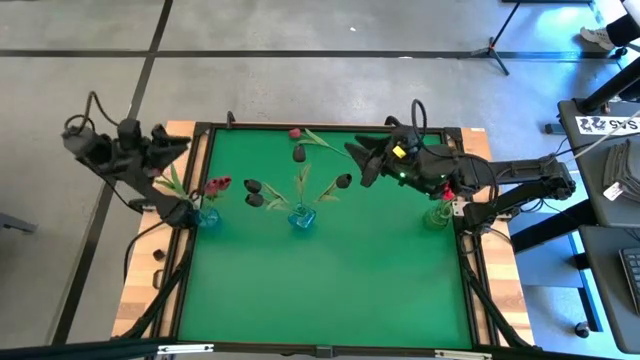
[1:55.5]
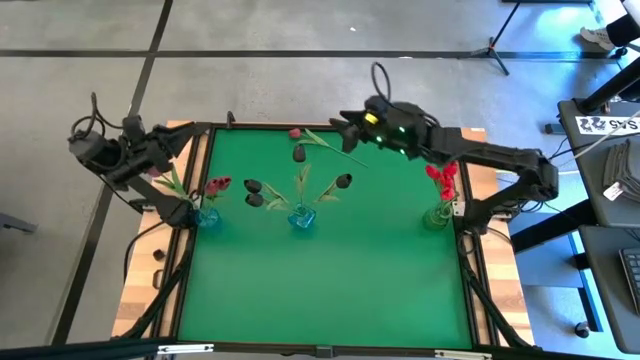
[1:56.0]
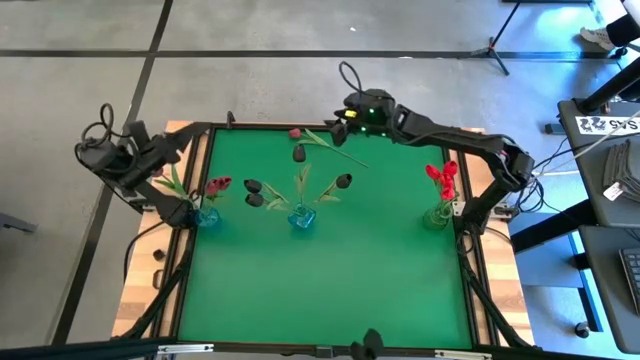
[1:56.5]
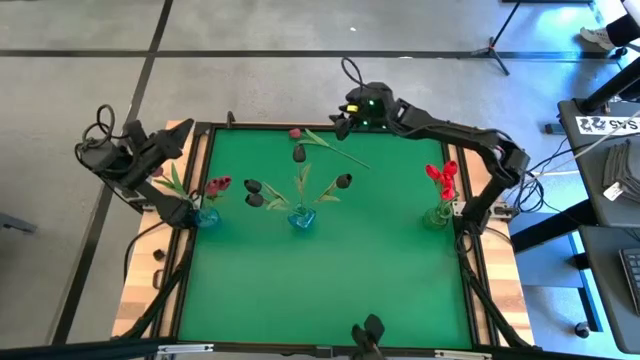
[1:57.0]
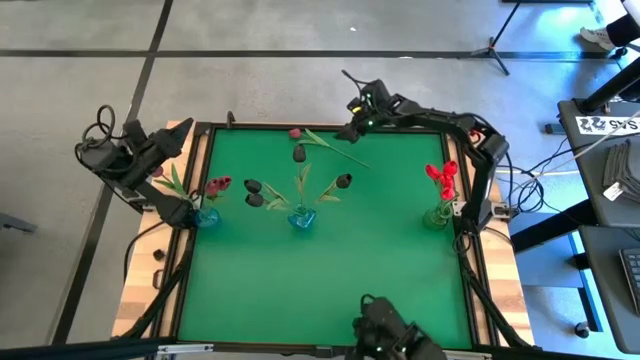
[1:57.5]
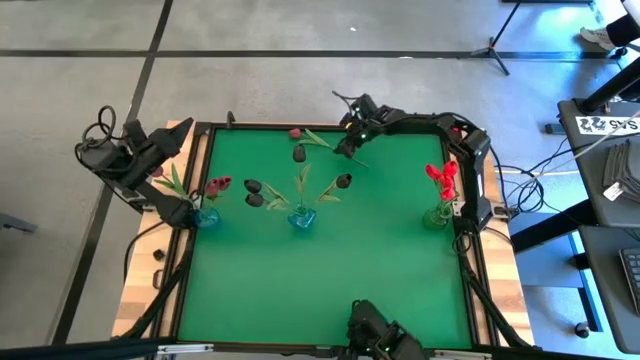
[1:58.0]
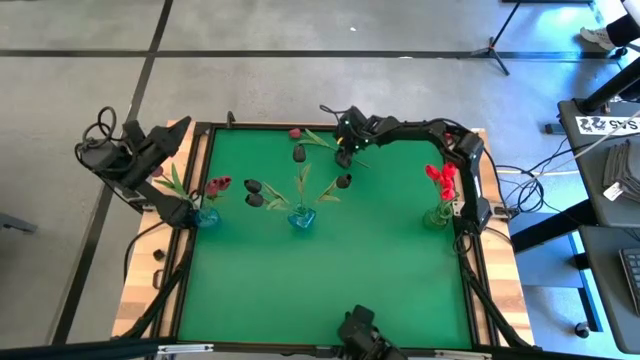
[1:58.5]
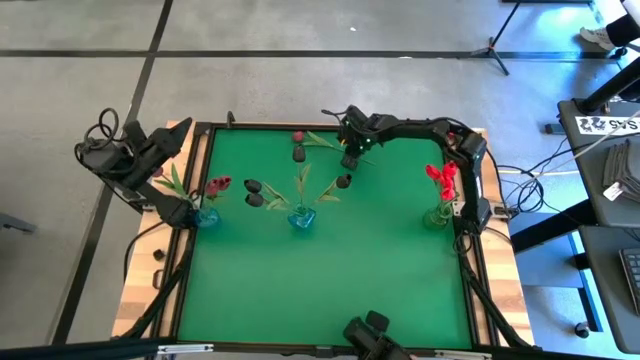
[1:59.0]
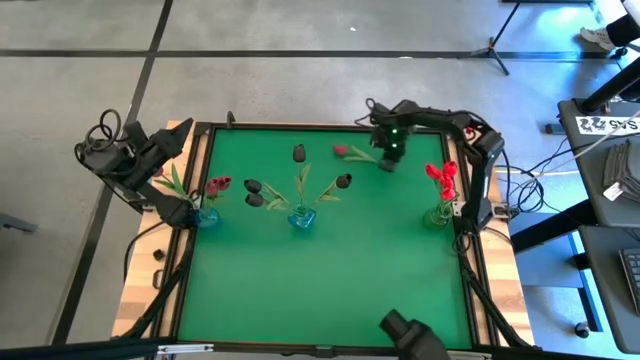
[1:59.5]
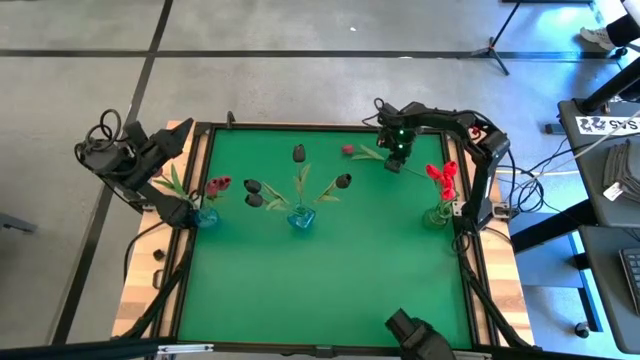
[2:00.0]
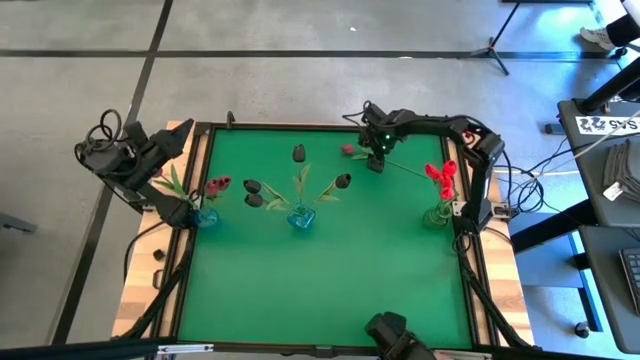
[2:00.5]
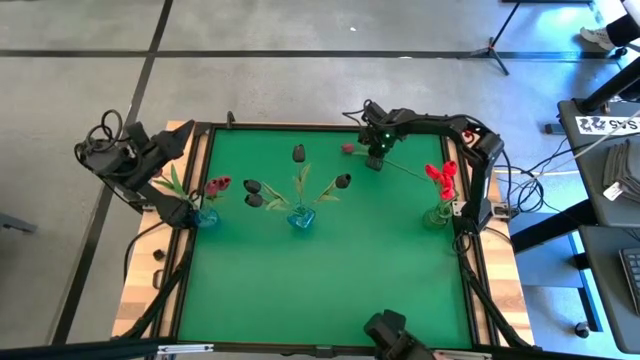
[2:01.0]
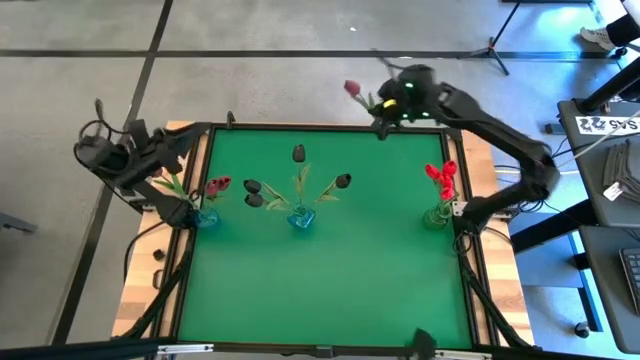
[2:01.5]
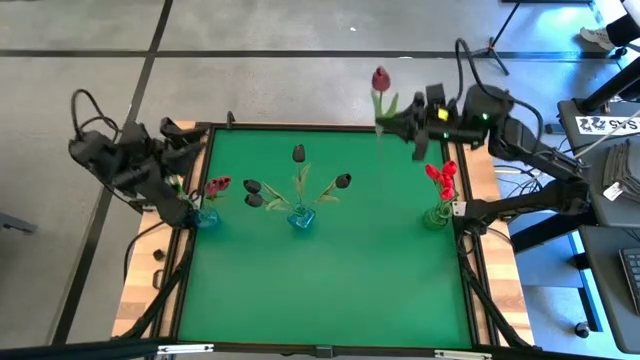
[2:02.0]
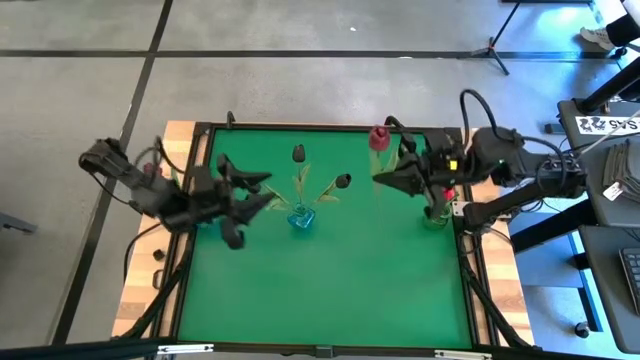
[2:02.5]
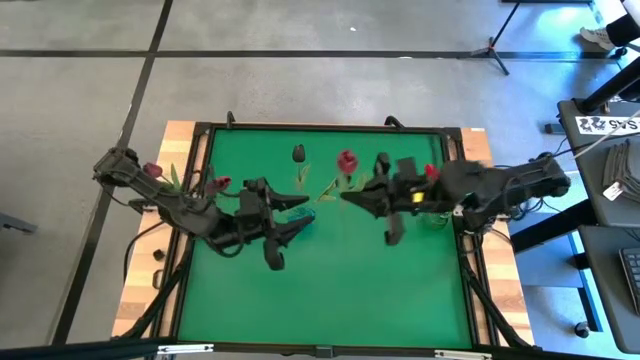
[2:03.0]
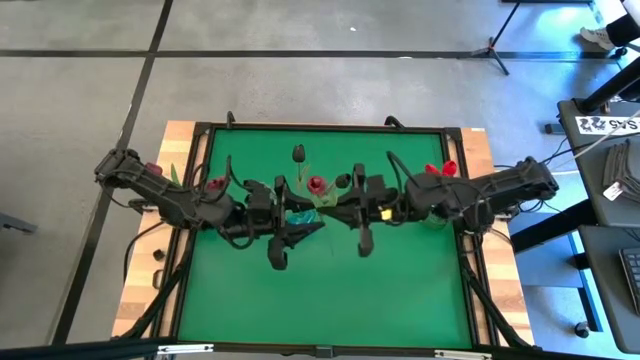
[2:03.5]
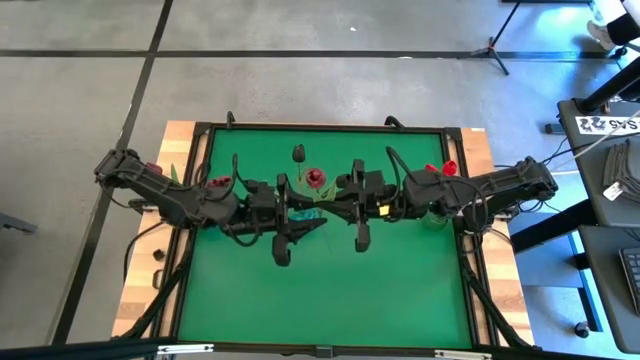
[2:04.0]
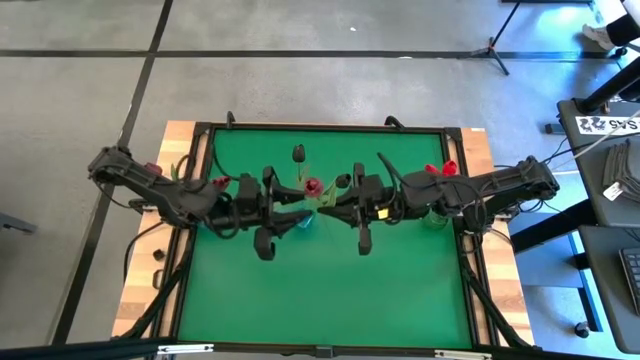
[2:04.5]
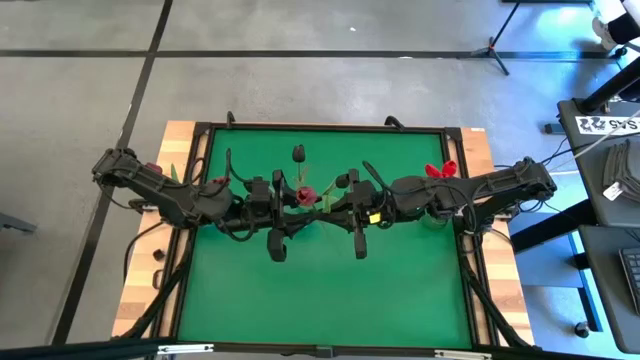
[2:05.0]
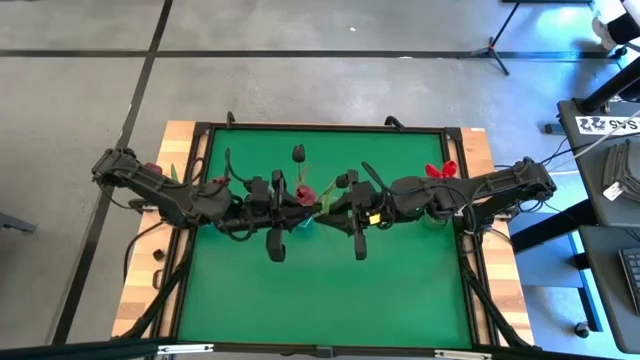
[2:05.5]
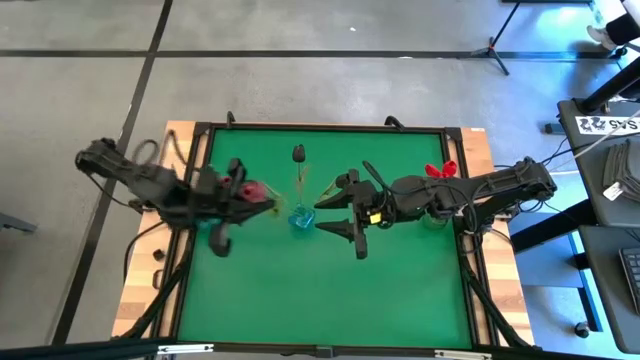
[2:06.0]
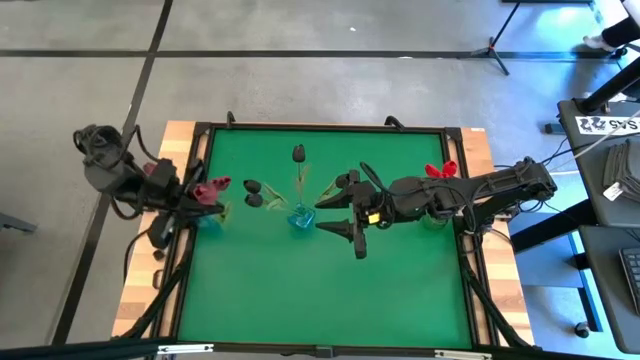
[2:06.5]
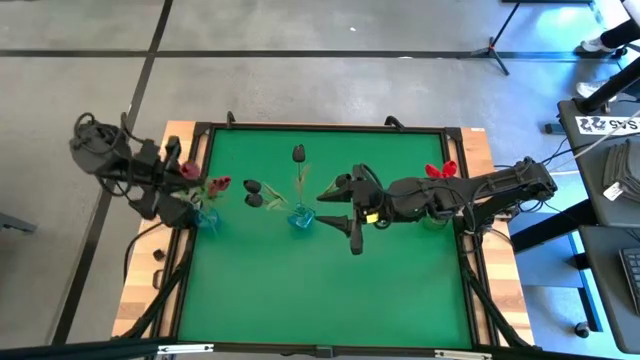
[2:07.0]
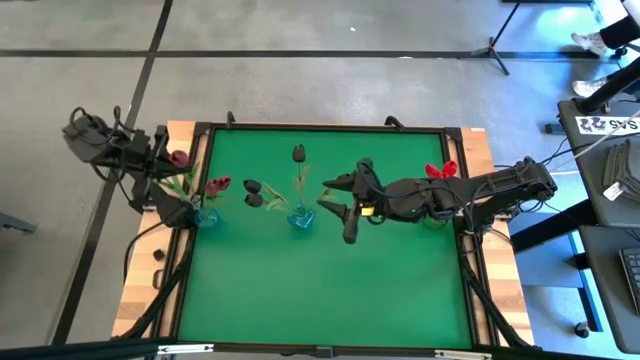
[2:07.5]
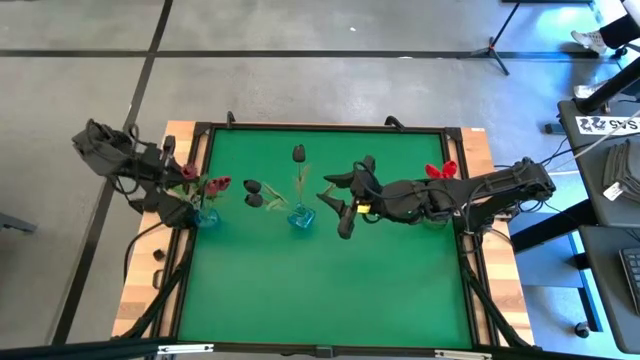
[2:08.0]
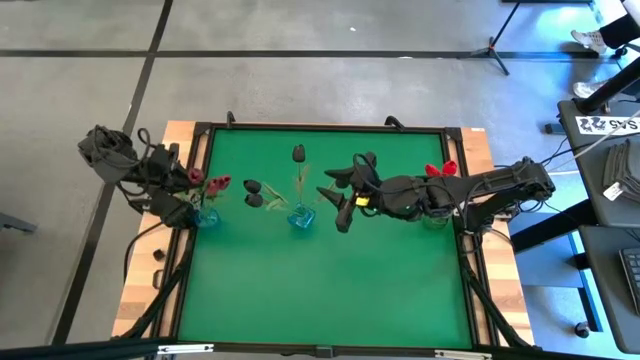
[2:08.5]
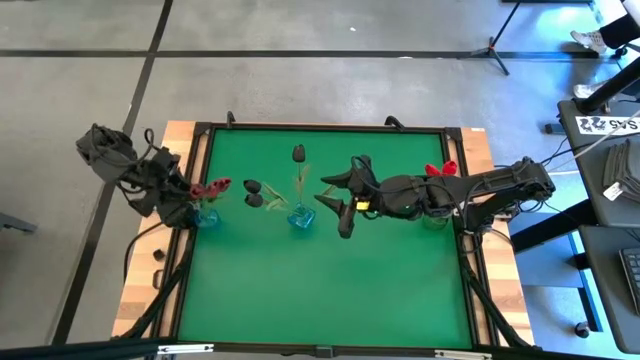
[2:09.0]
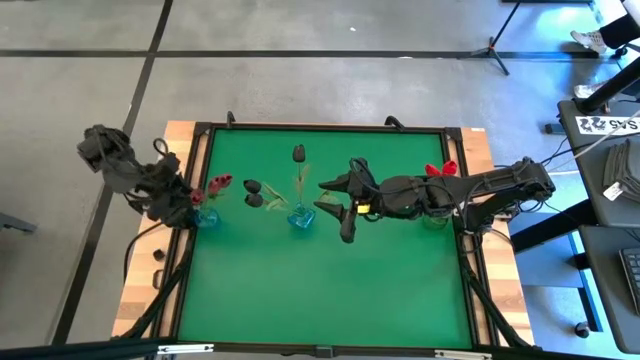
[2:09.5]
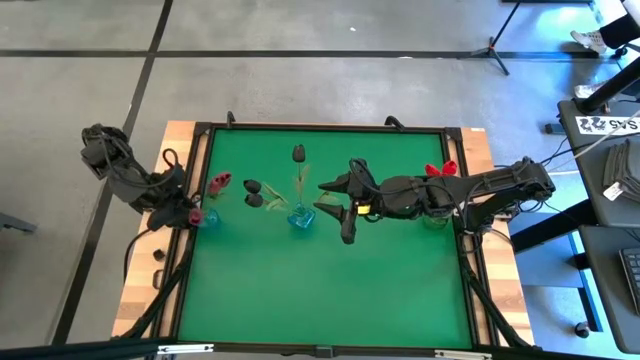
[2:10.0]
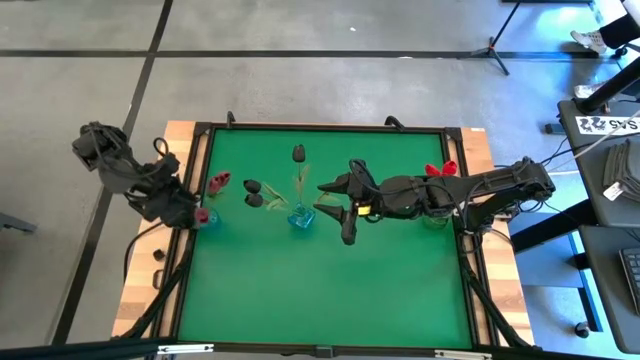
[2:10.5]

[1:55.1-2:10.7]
Task: Sort flowers into vase by color
Put the pink tulip into the left blue vase
